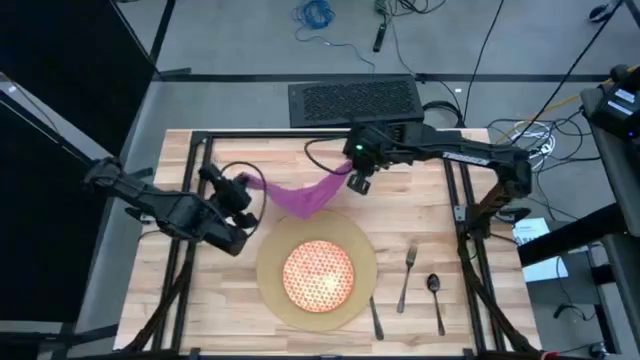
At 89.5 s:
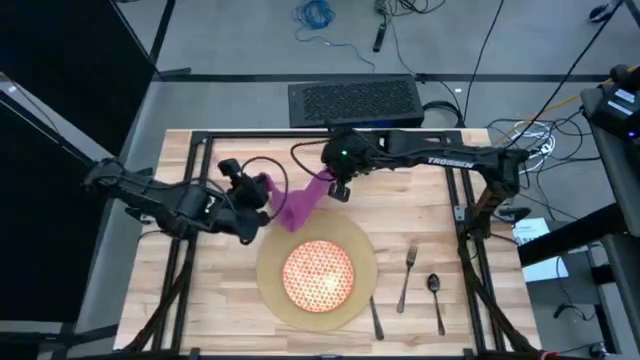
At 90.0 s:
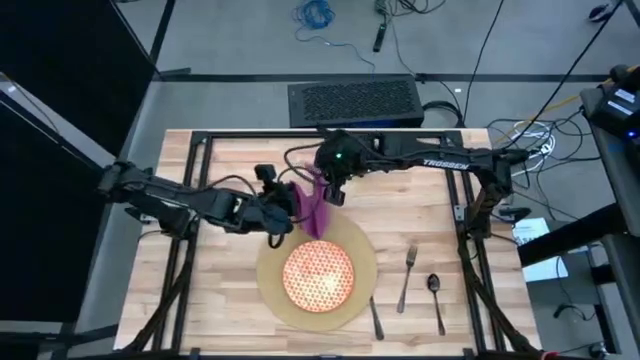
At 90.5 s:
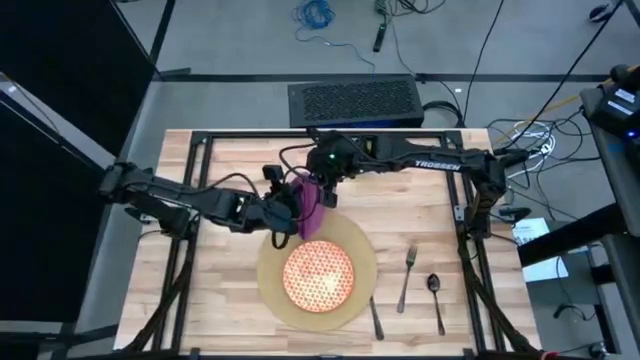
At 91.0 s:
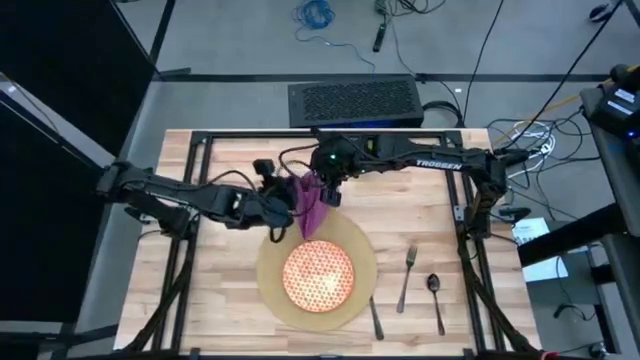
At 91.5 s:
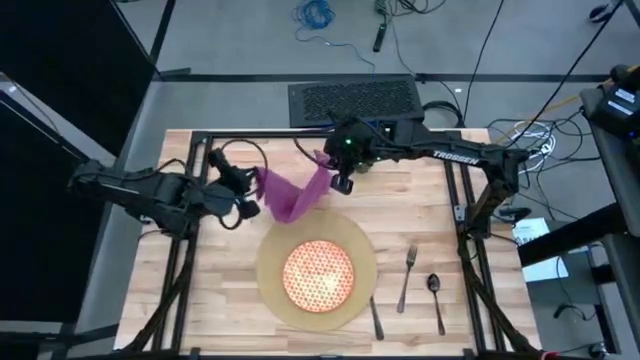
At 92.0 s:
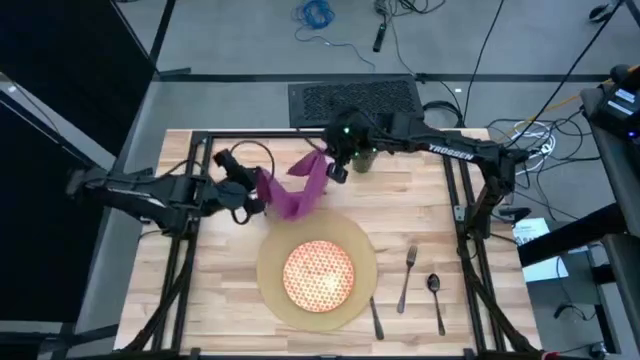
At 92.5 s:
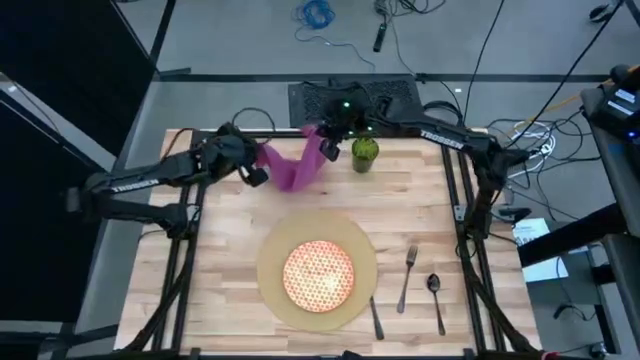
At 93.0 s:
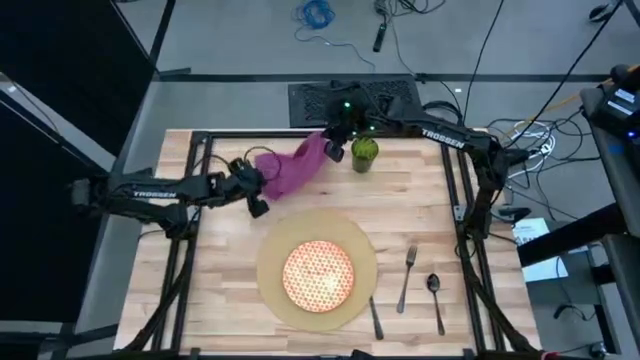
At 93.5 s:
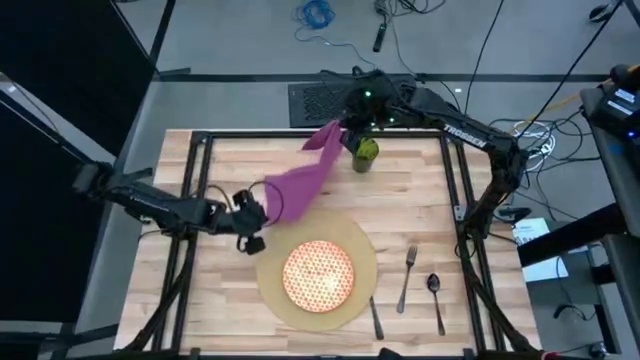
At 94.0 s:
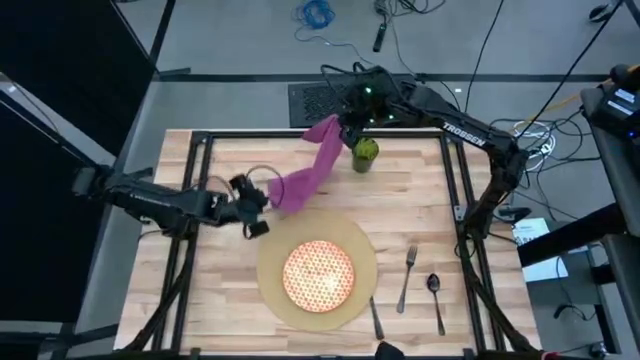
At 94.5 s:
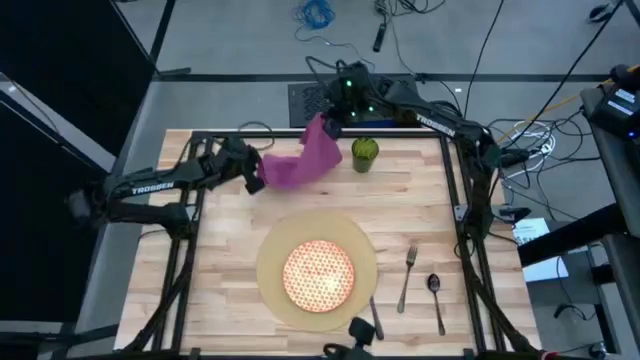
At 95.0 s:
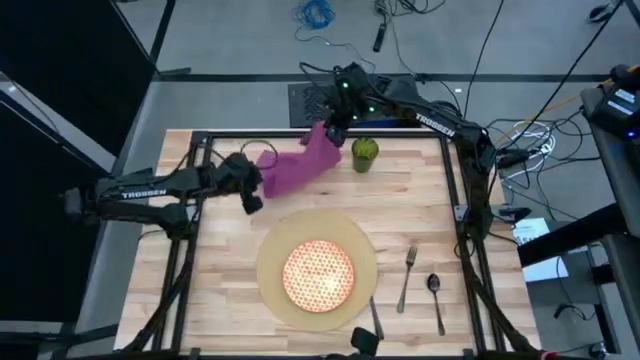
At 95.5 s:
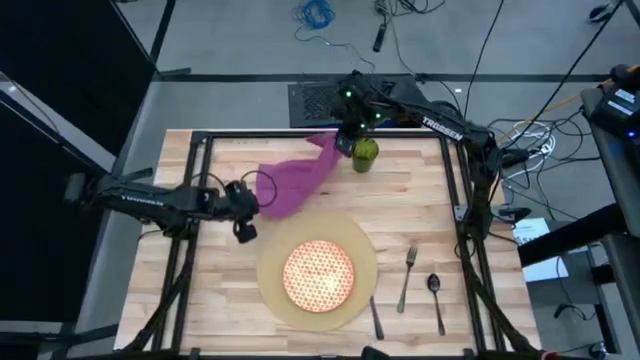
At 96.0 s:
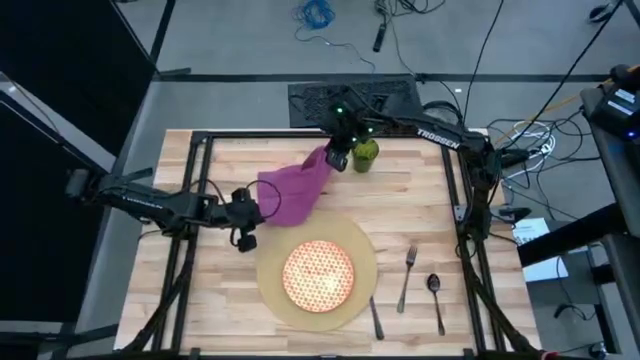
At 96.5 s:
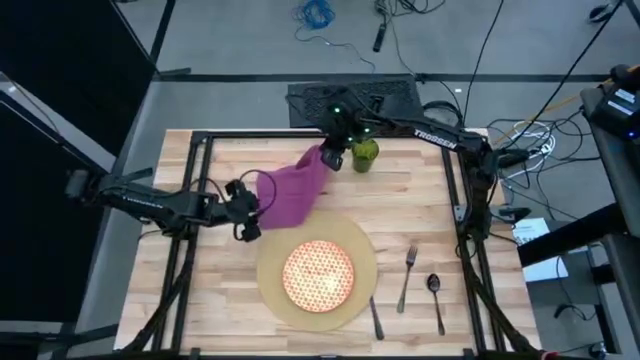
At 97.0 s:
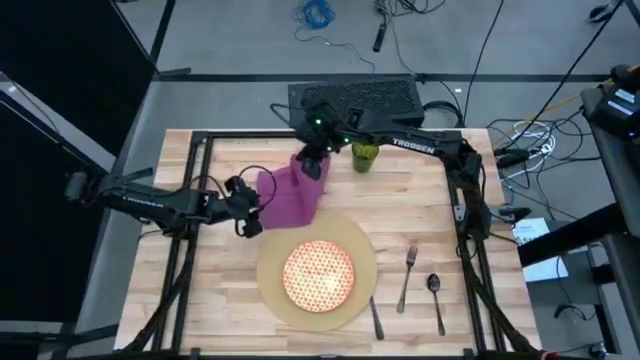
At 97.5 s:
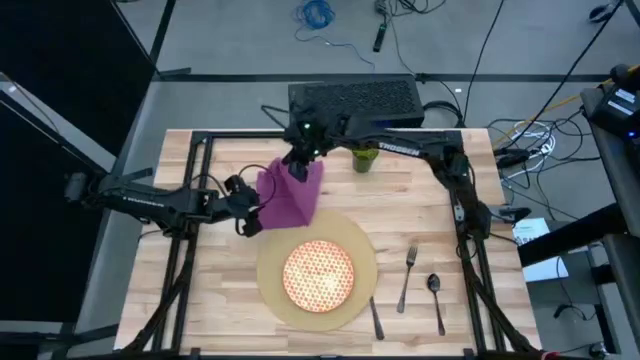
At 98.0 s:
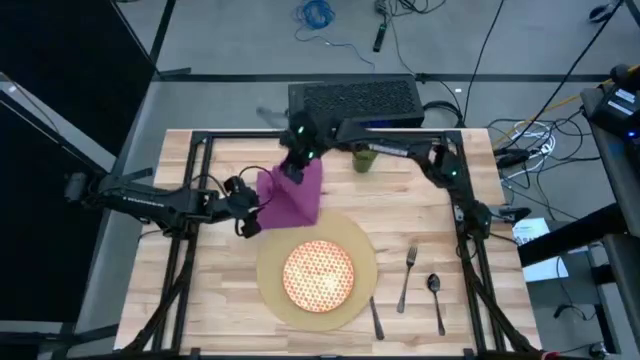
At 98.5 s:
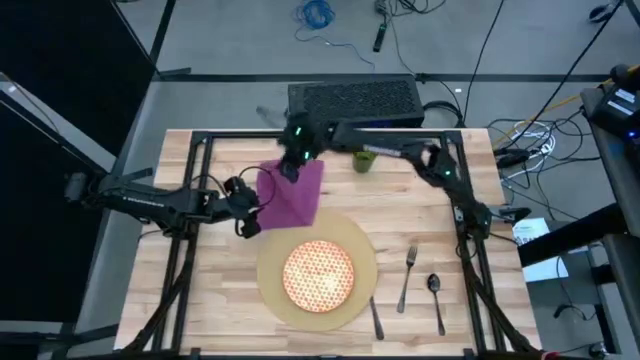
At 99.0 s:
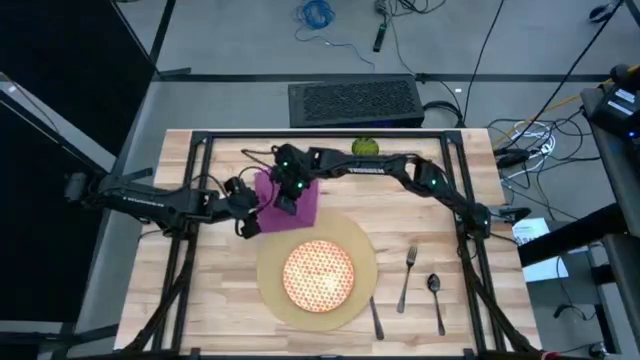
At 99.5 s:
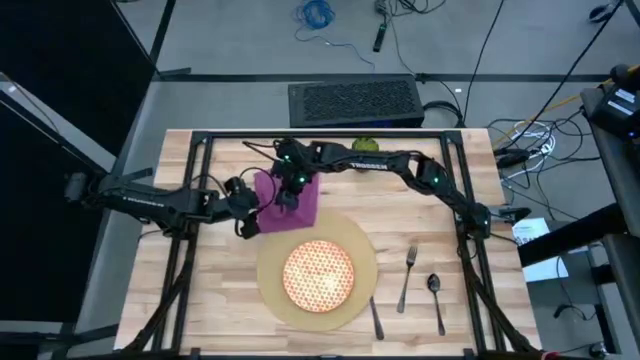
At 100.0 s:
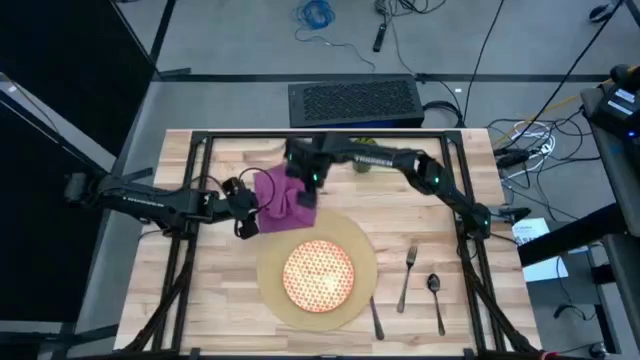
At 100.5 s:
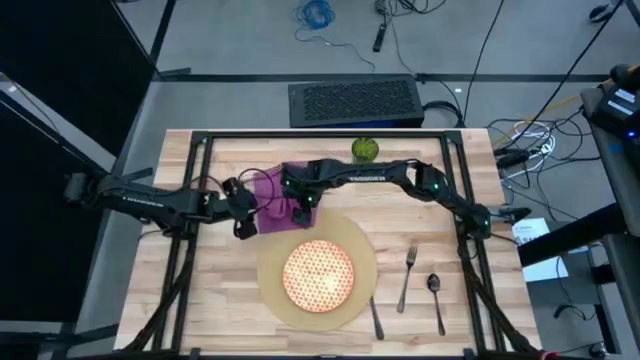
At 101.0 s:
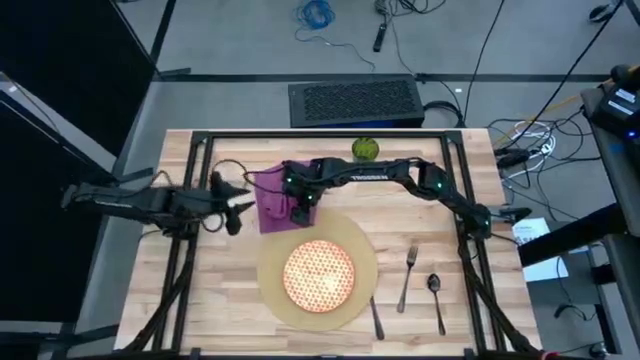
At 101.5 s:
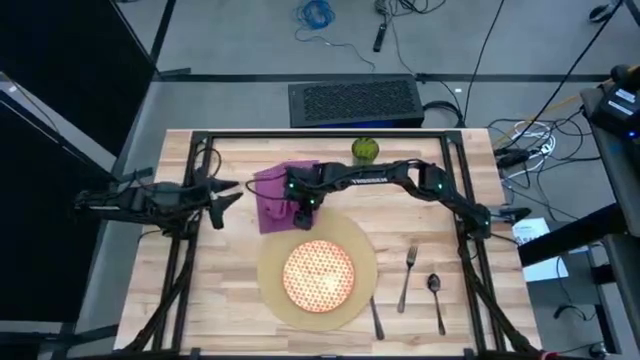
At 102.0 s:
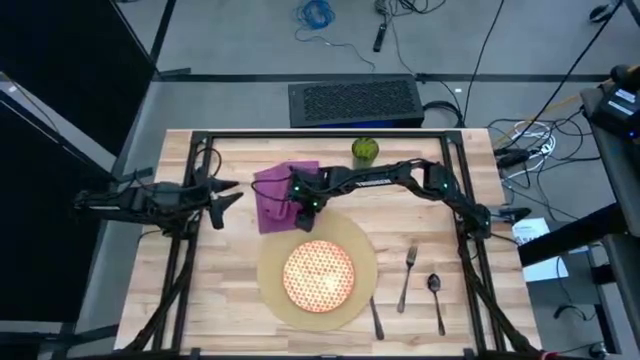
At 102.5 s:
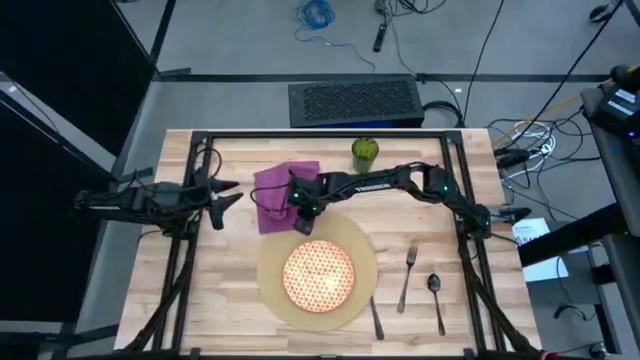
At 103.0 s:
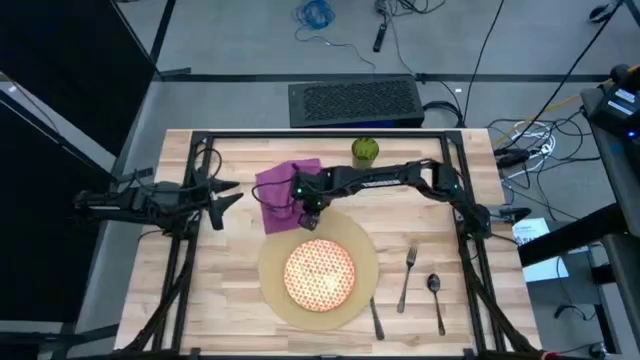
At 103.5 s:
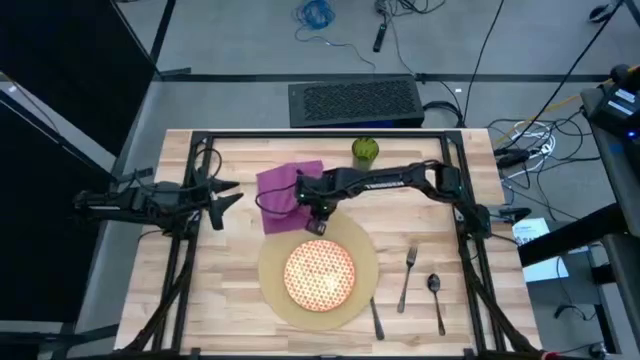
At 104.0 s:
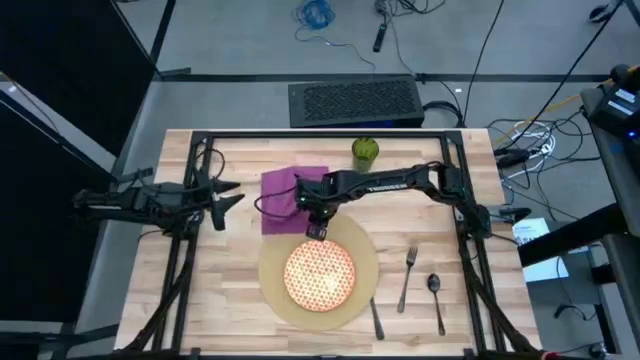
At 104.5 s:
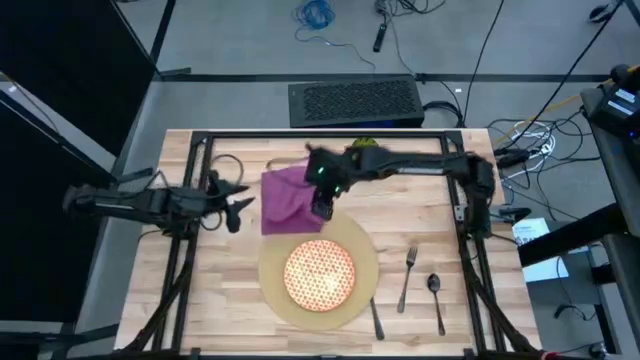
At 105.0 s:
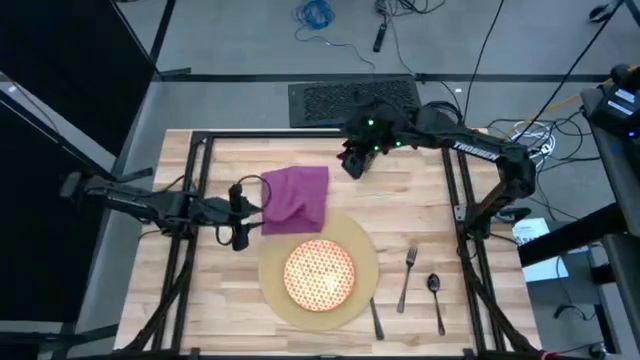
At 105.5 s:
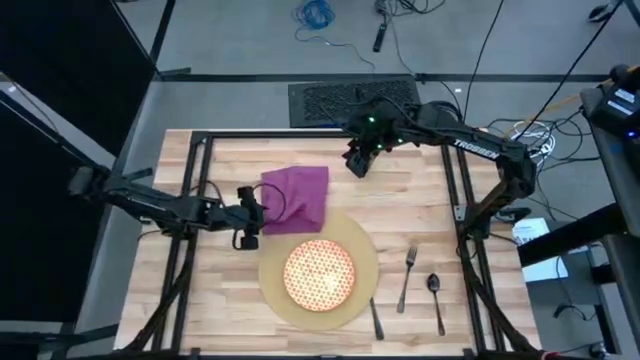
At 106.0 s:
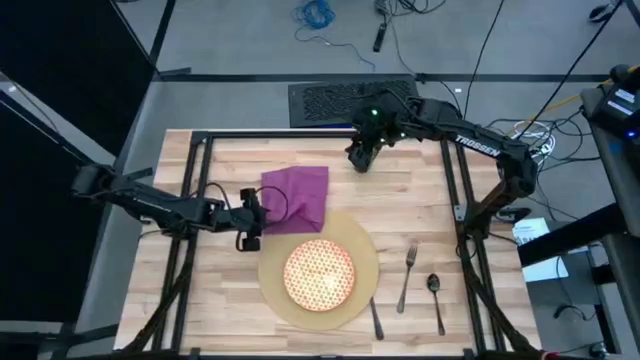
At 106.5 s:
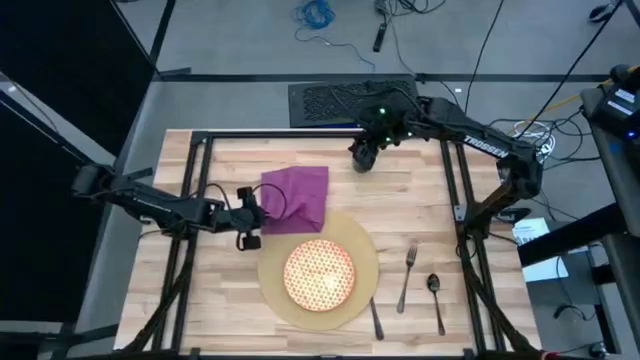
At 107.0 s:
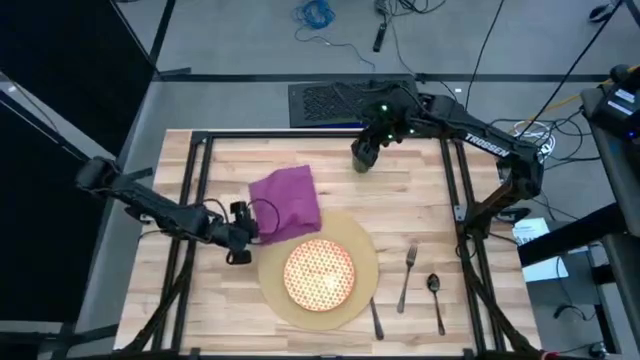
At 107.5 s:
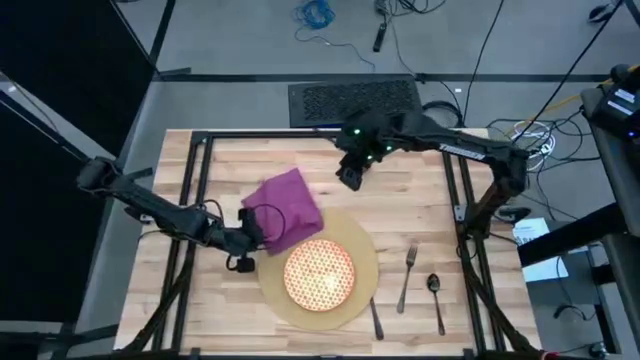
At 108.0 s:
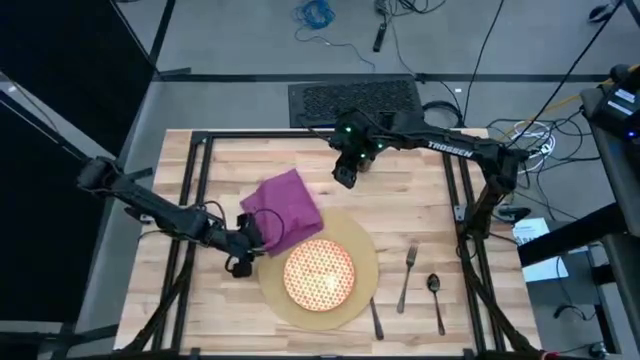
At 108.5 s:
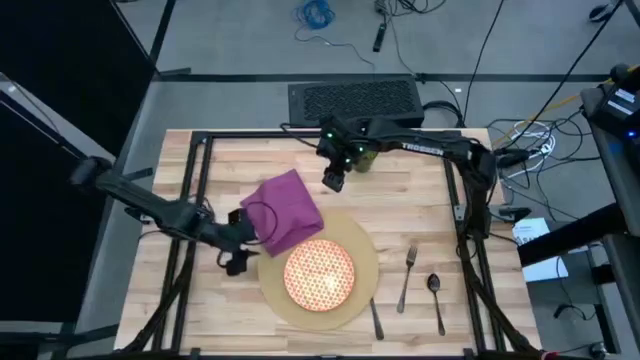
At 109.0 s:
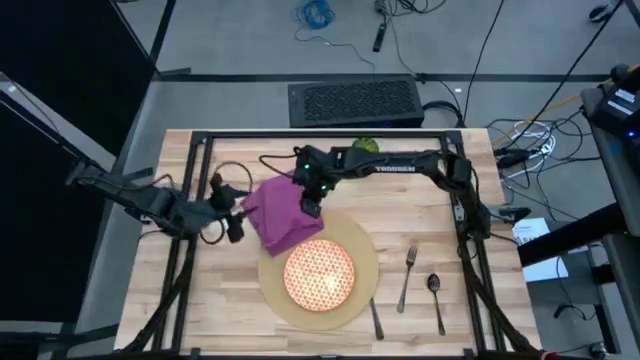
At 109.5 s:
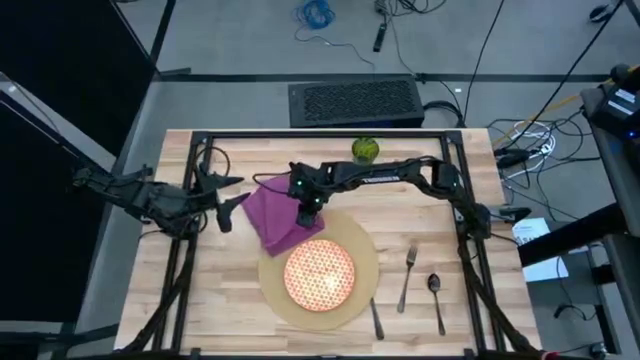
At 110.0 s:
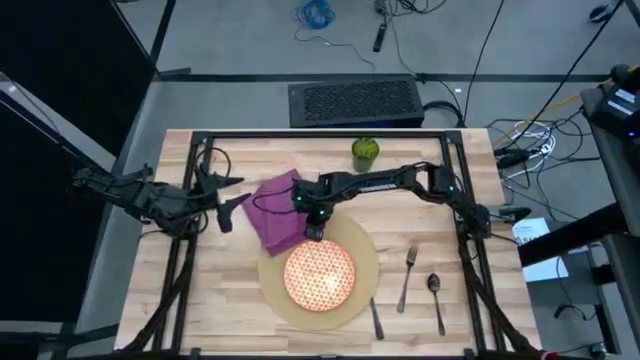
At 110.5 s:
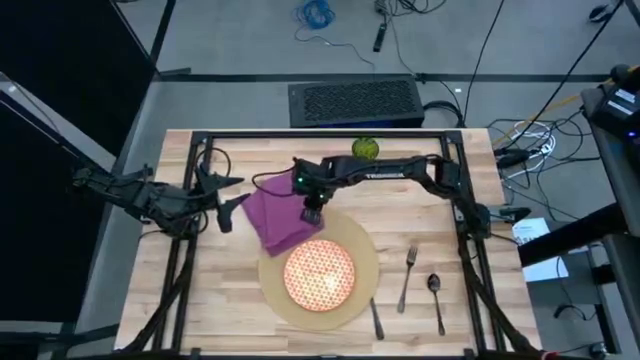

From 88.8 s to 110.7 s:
Task: Set table place
Fold the purple table napkin
